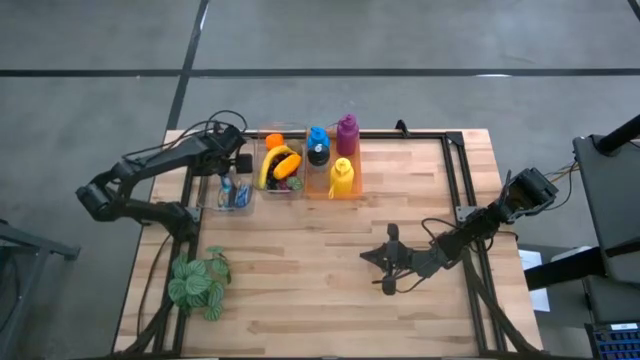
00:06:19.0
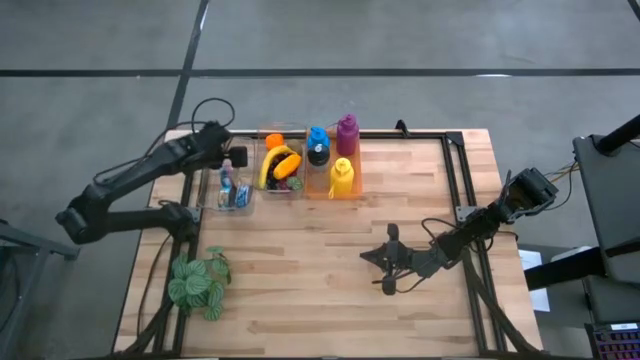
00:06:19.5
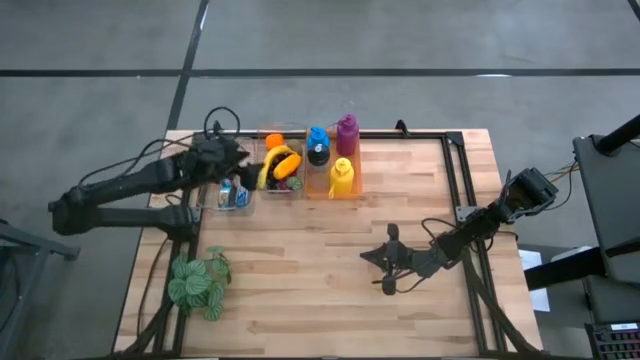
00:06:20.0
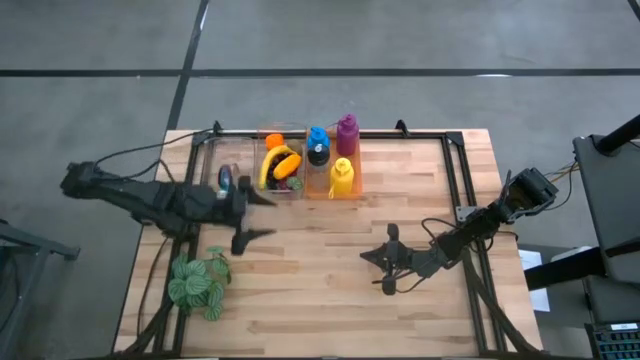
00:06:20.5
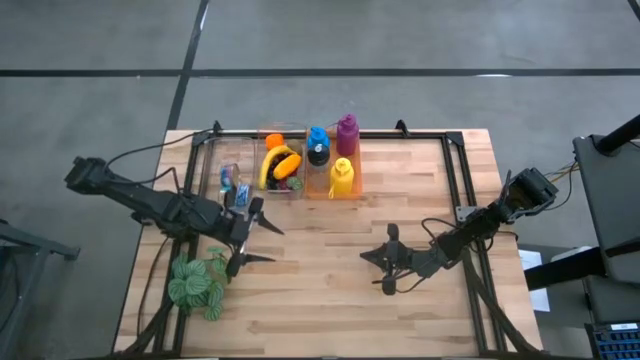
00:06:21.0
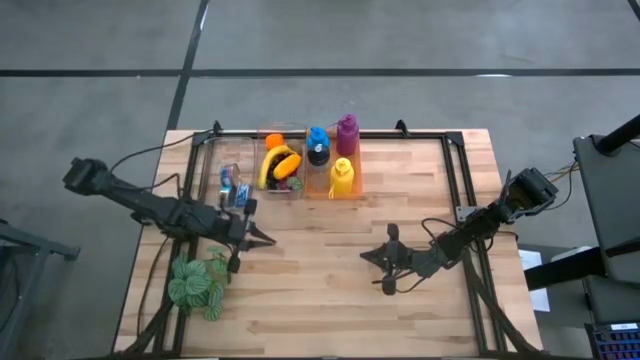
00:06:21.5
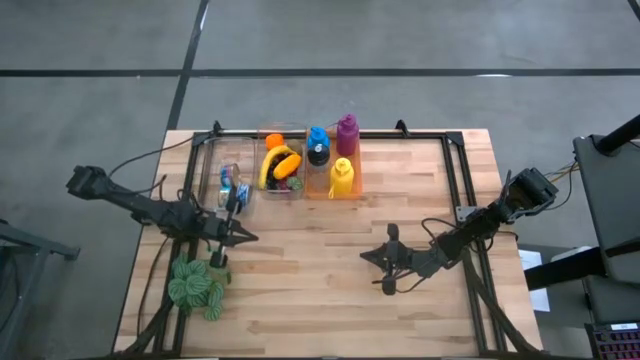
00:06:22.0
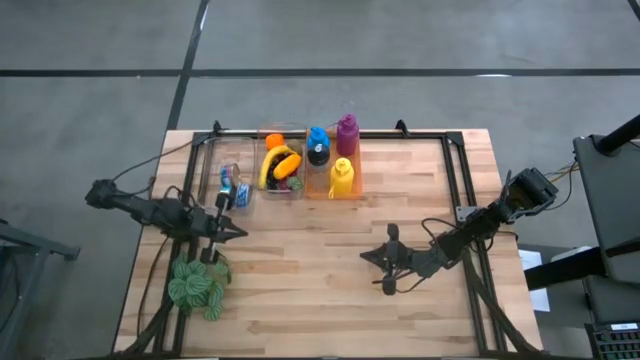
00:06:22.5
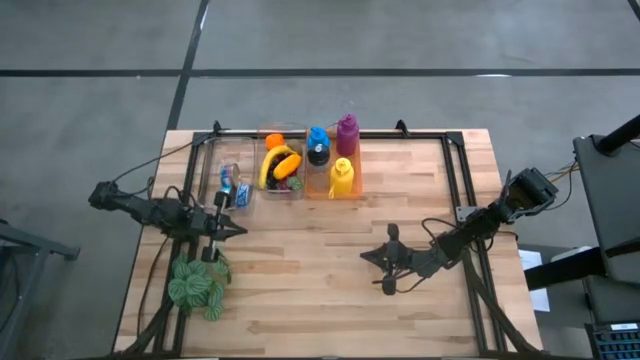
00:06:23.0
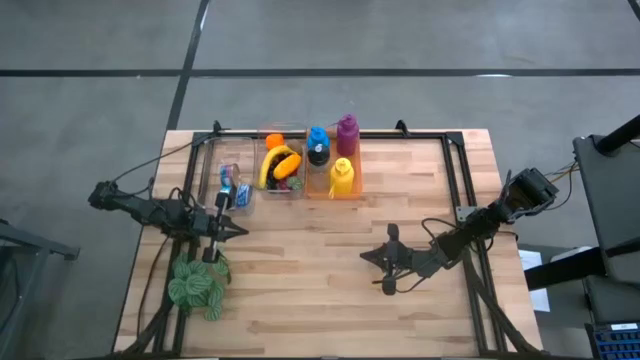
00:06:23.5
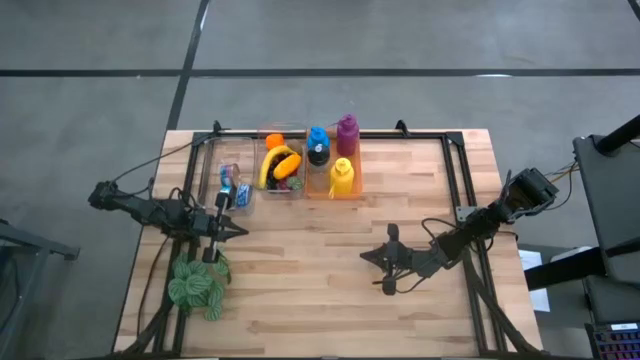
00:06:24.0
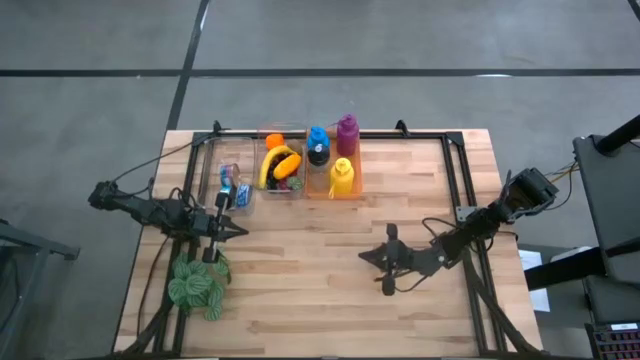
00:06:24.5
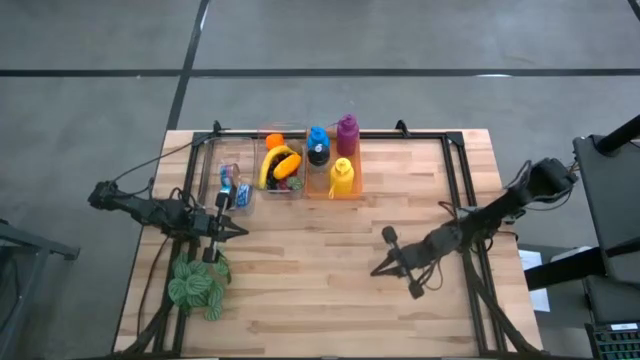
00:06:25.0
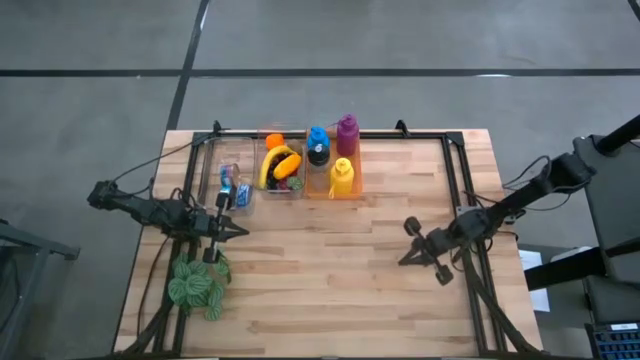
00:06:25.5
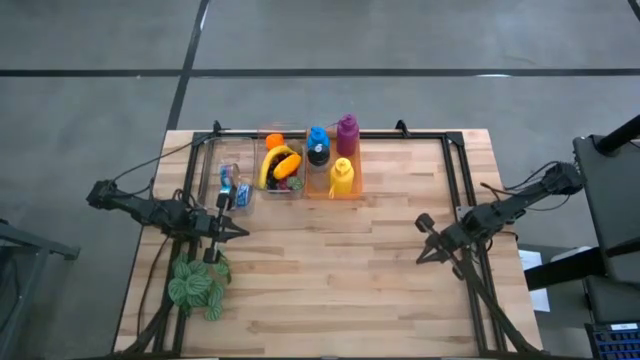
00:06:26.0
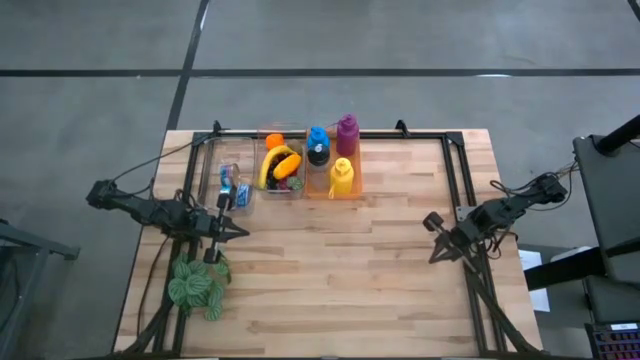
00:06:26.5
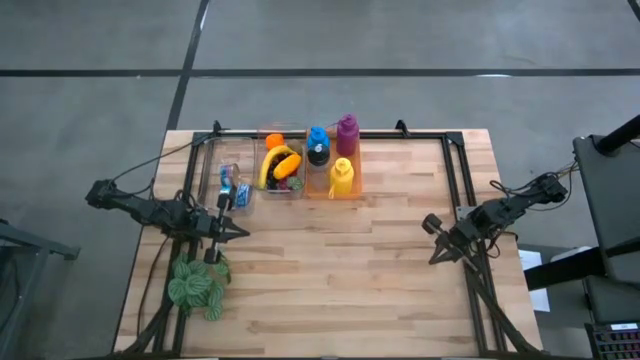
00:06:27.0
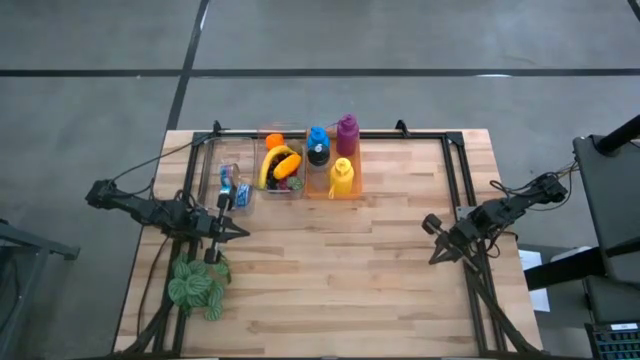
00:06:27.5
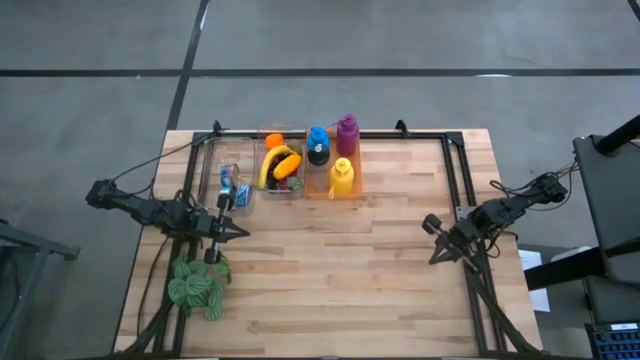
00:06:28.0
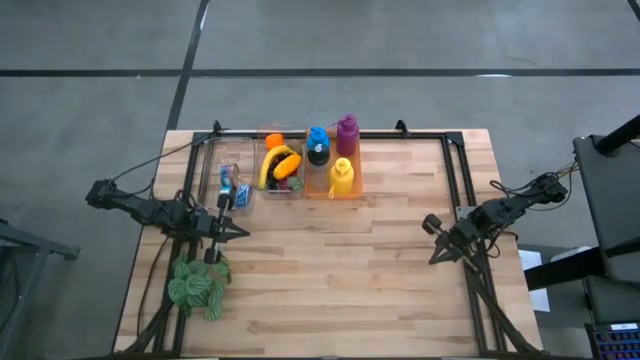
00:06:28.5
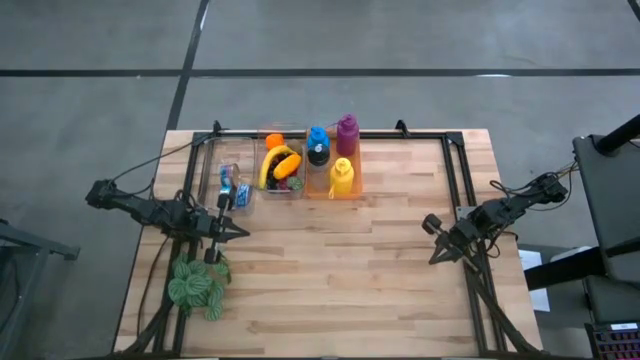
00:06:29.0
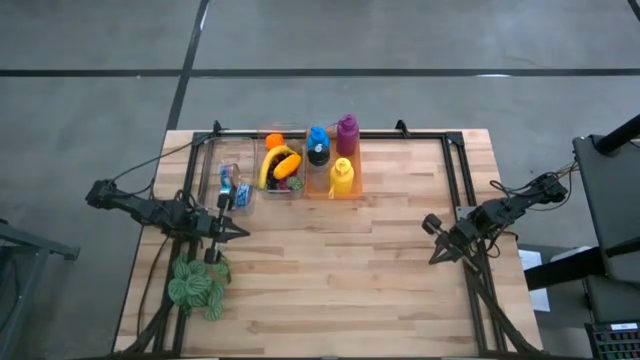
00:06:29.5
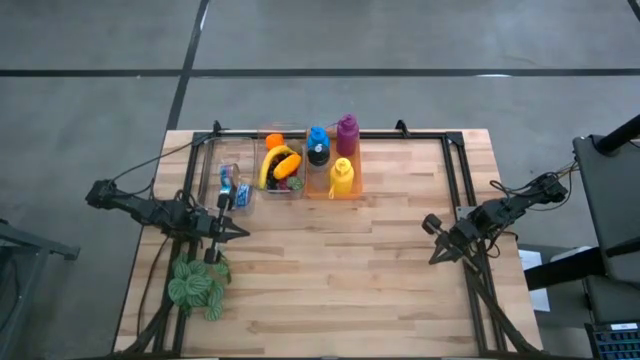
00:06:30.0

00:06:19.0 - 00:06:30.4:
Task: Pick & Place Food Item
Return to Home Position

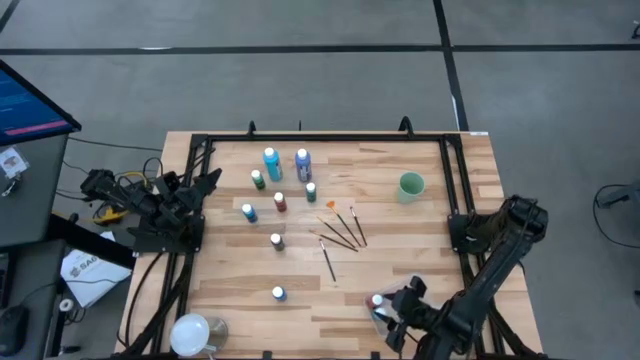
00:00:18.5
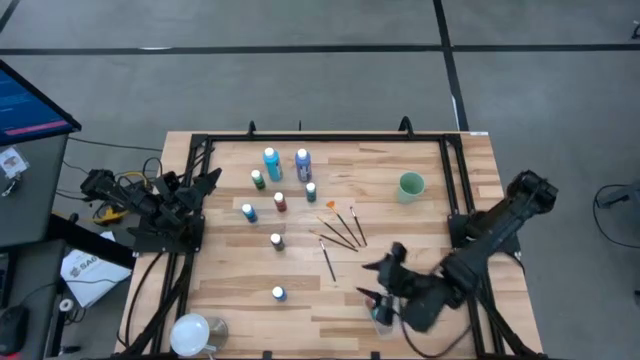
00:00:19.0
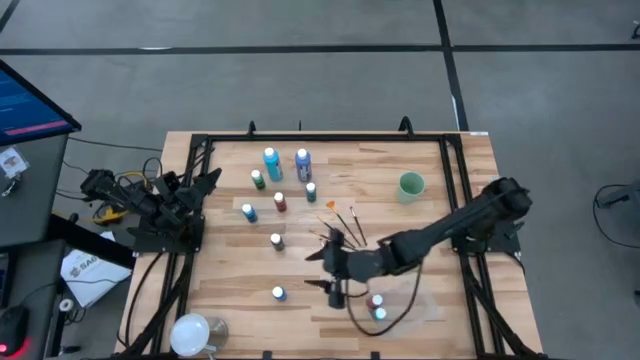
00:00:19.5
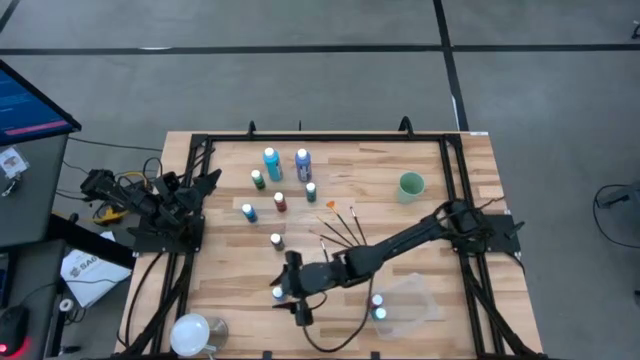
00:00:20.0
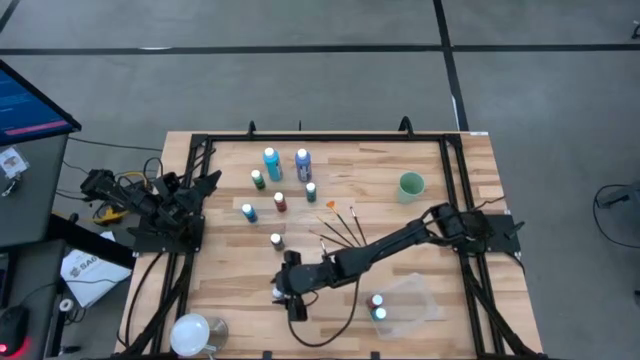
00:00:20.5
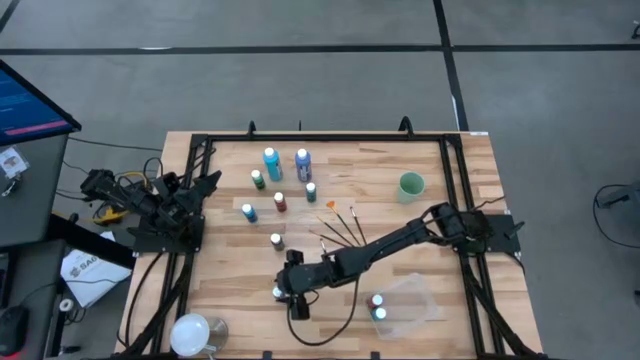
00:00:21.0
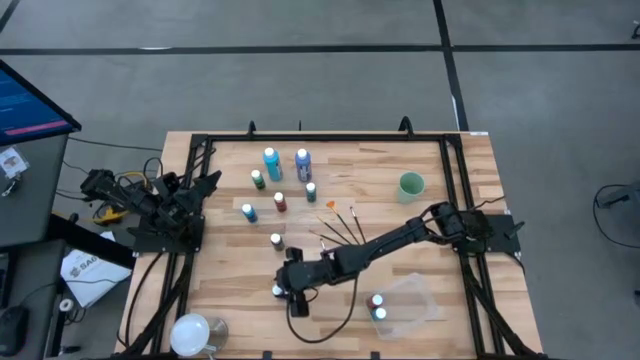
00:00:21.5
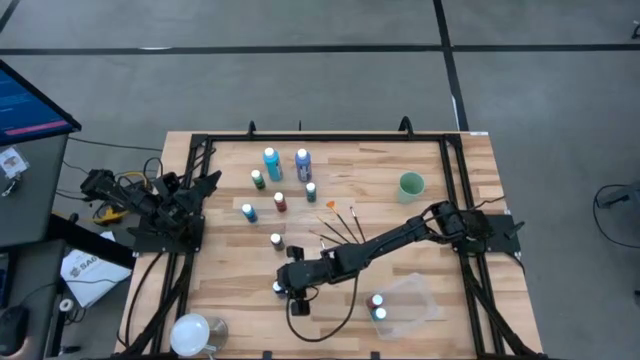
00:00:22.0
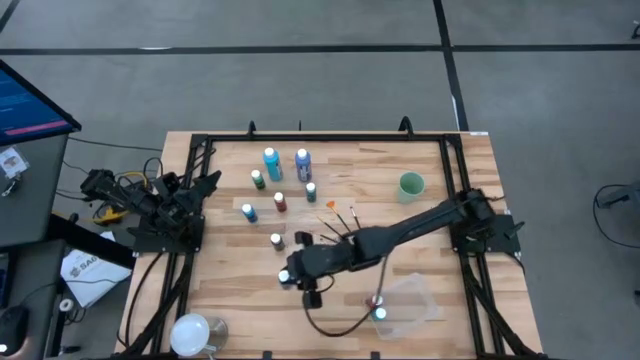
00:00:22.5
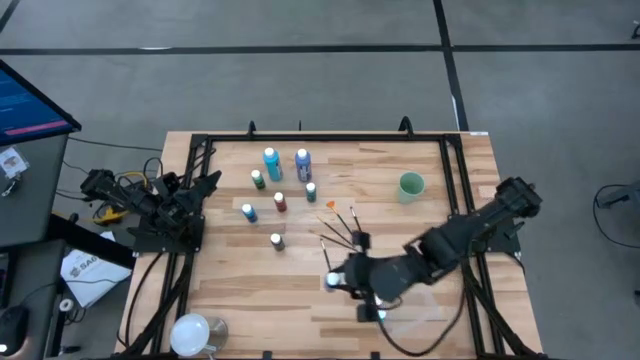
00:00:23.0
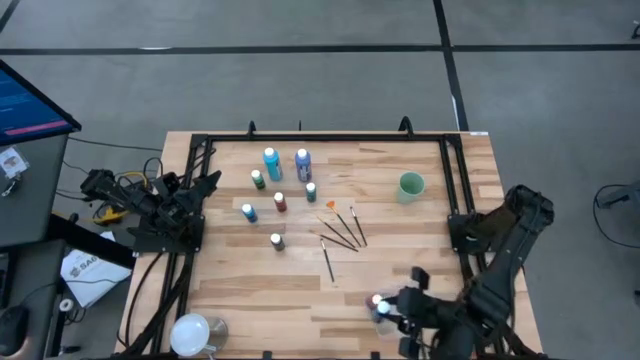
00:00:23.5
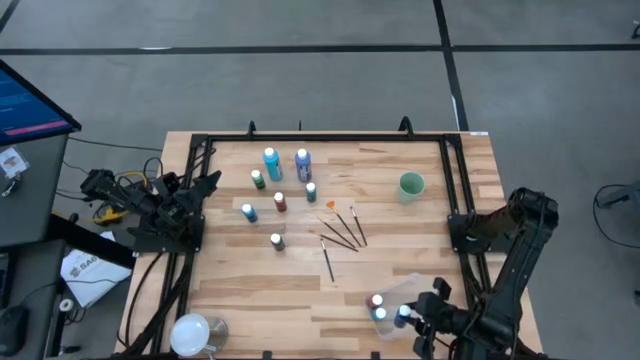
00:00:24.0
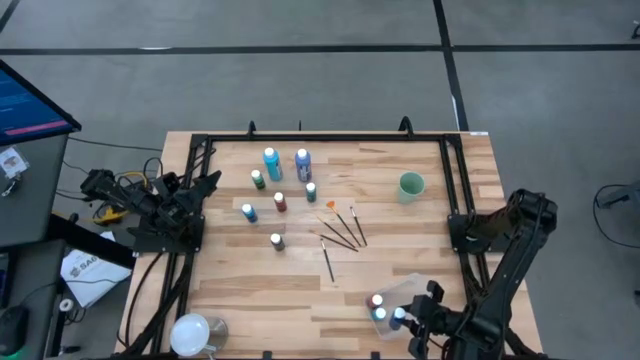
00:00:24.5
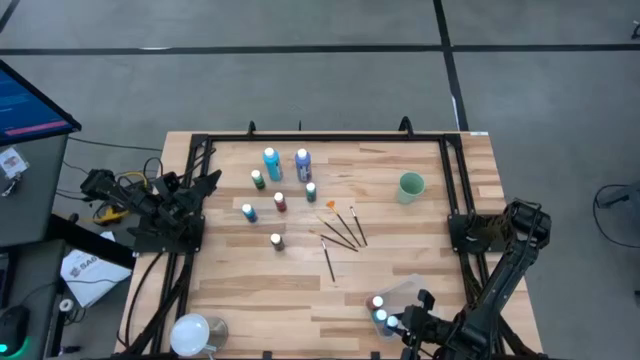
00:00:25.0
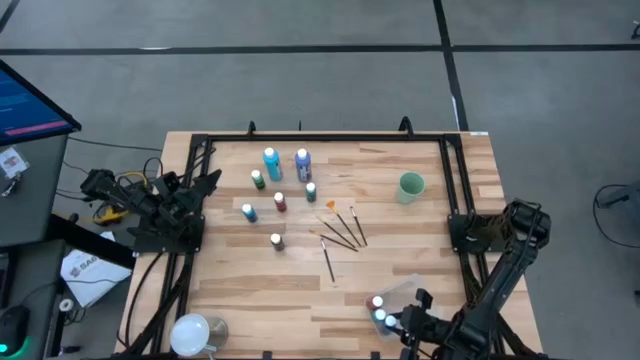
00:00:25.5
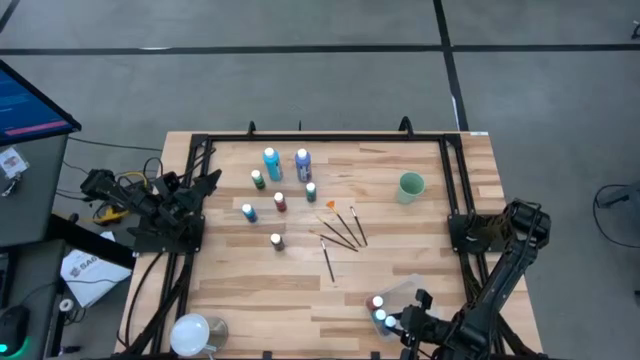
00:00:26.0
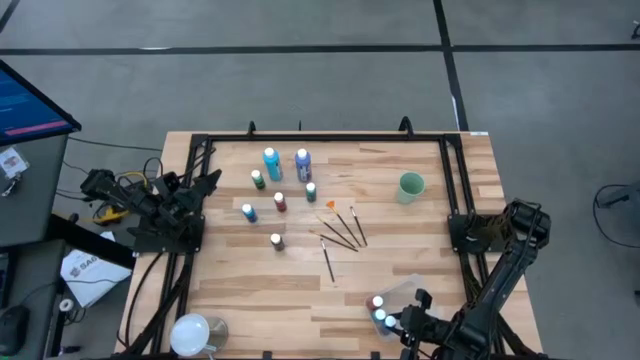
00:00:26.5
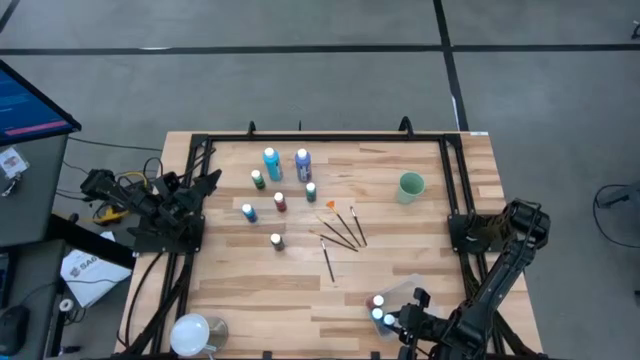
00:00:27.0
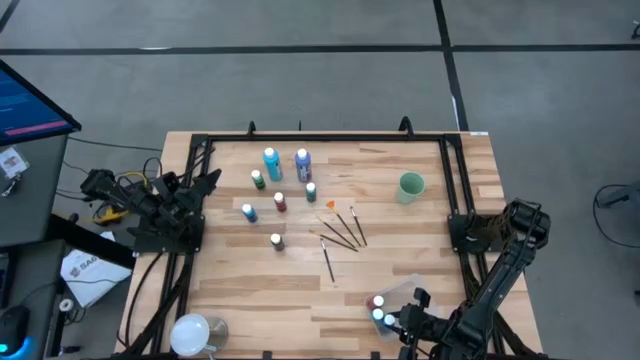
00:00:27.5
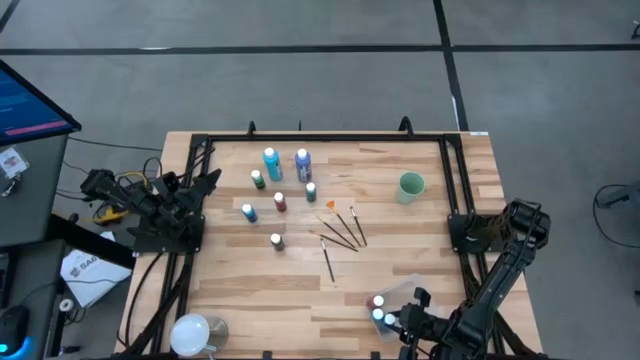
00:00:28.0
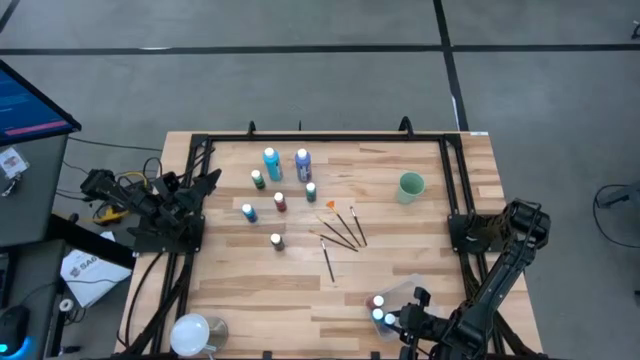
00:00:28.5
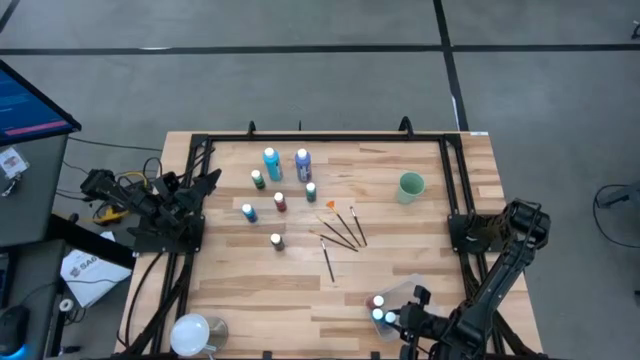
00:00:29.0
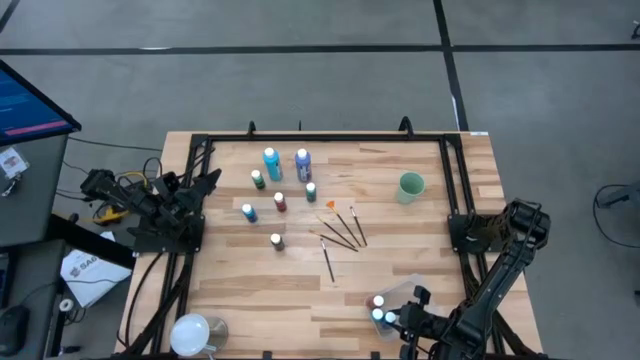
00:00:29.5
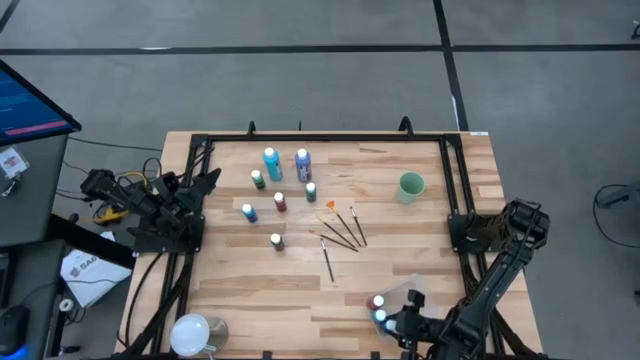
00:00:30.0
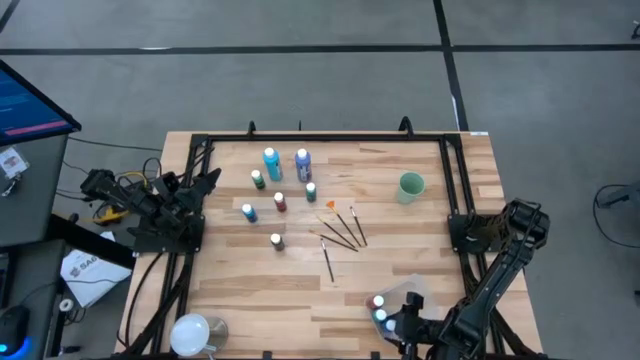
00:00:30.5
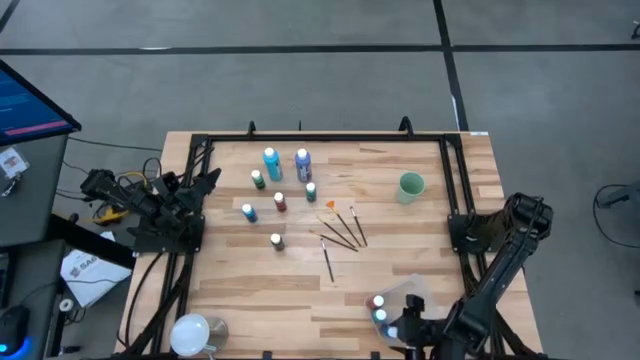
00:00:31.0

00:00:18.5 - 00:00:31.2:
Task: Pick & Place Paint Supplies
Put the blue paint bottle into the transparent bin
